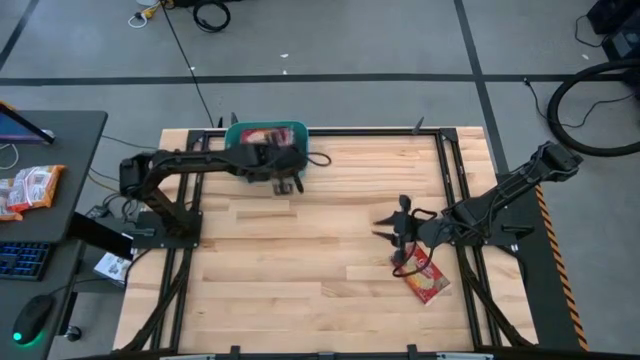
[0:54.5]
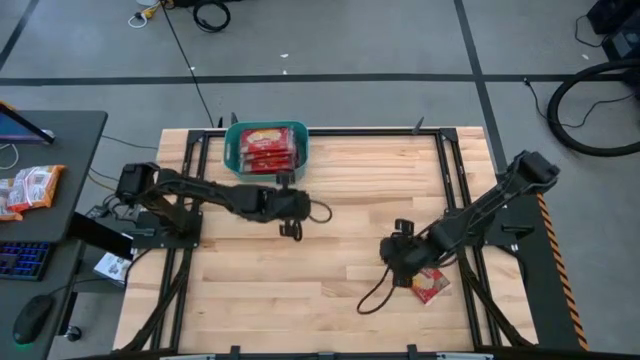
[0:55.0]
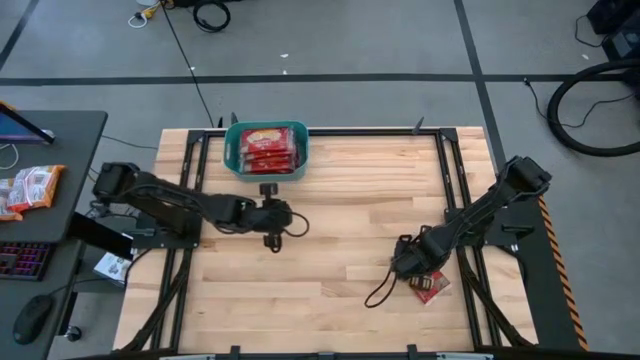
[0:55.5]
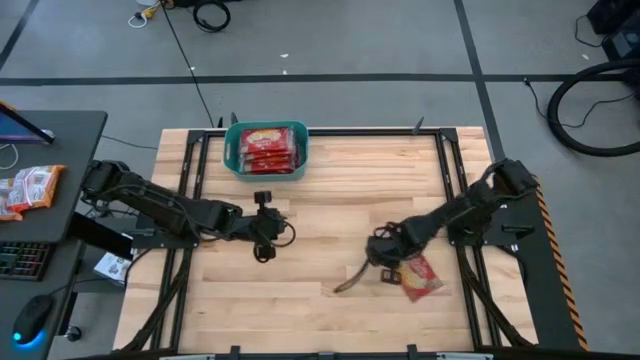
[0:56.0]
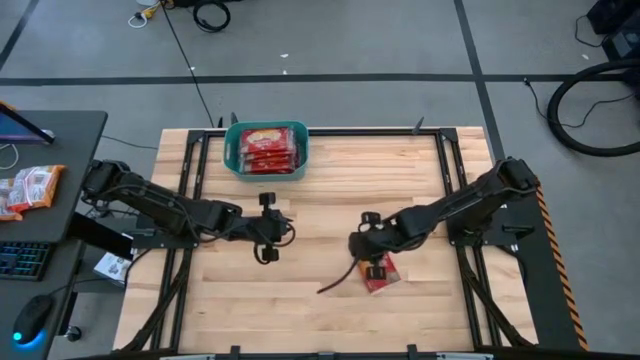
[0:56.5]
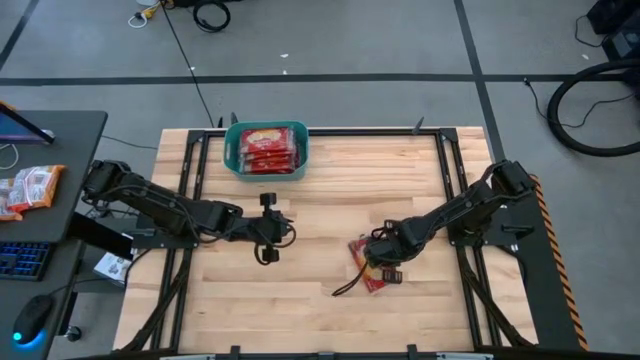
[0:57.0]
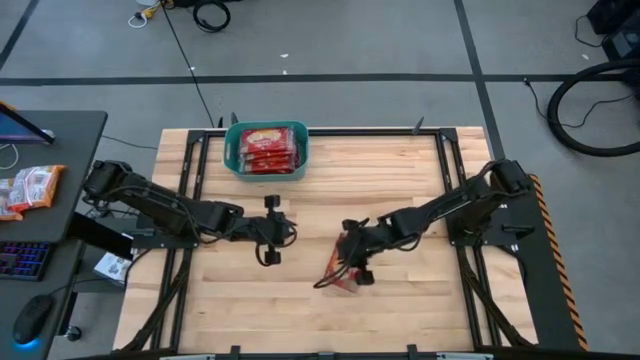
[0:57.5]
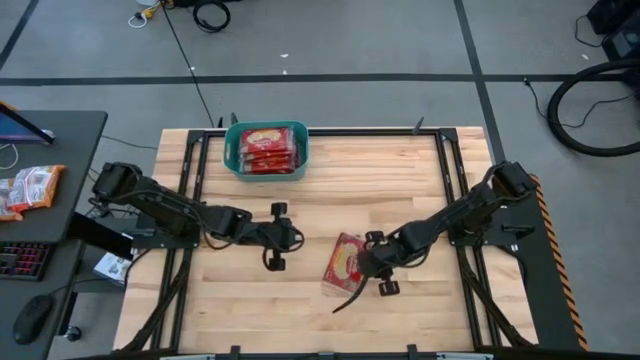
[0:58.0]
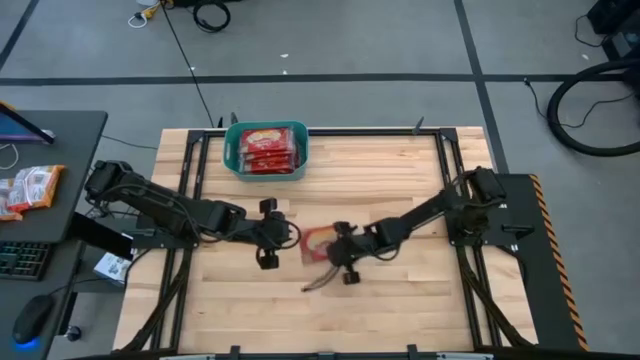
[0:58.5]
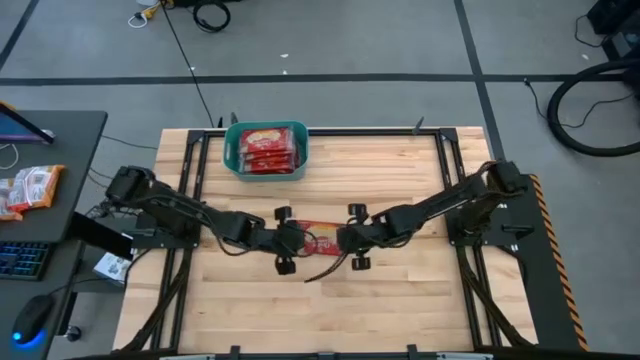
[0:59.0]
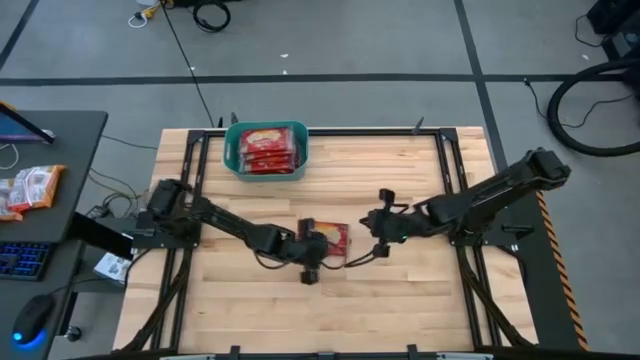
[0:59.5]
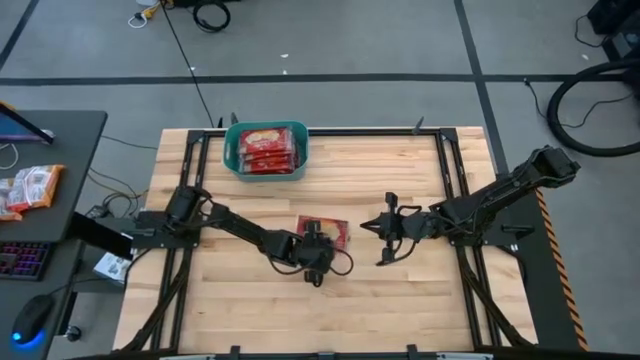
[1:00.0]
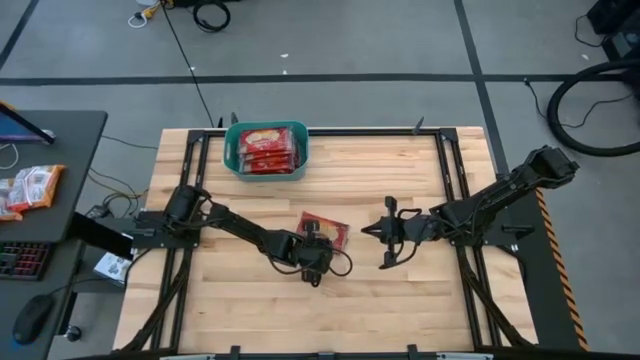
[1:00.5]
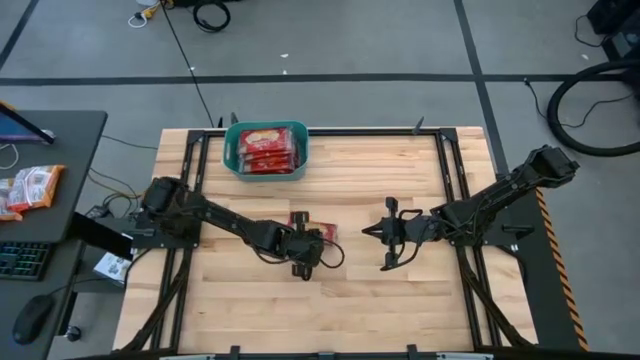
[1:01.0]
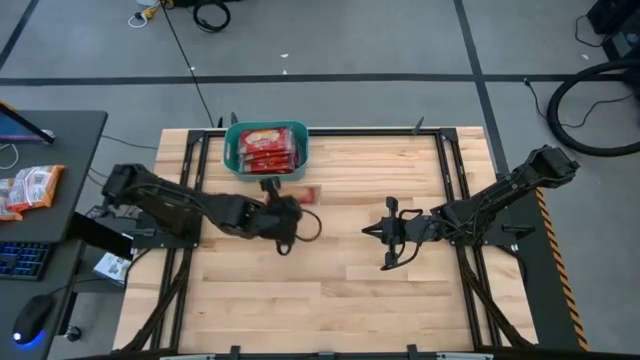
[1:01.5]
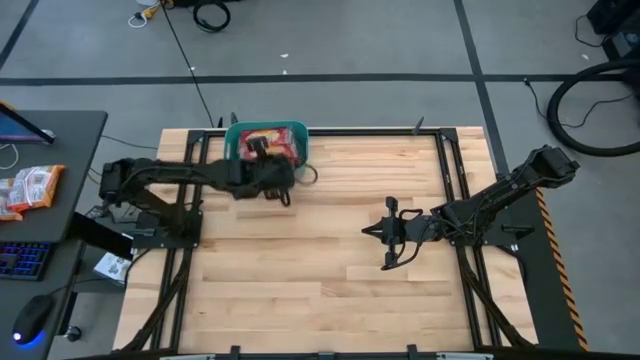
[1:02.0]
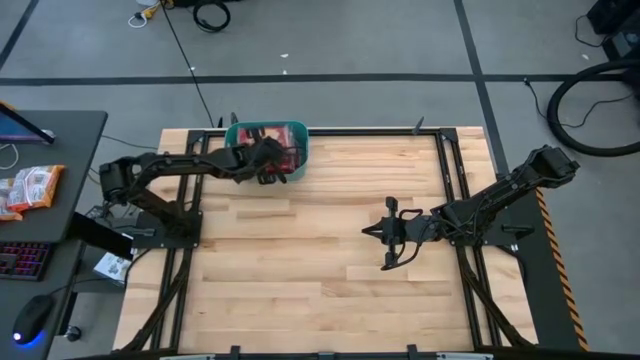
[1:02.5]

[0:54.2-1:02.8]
Task: Sort popcorn bags into baskets
Put the red popcorn bag into the green bin

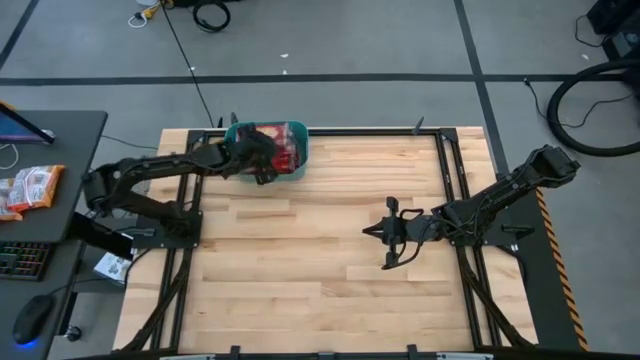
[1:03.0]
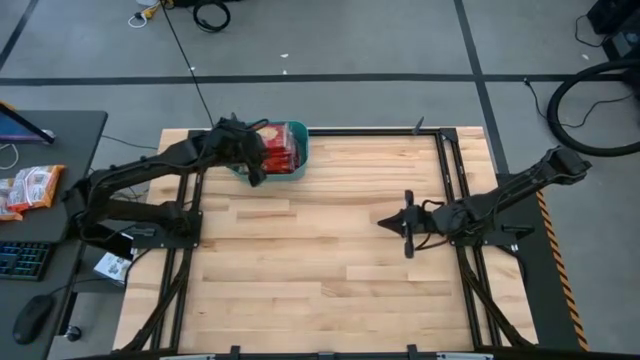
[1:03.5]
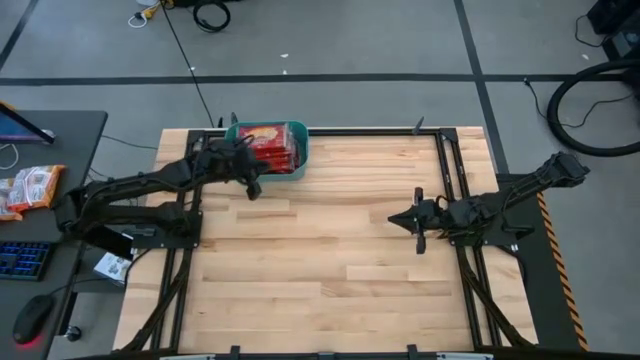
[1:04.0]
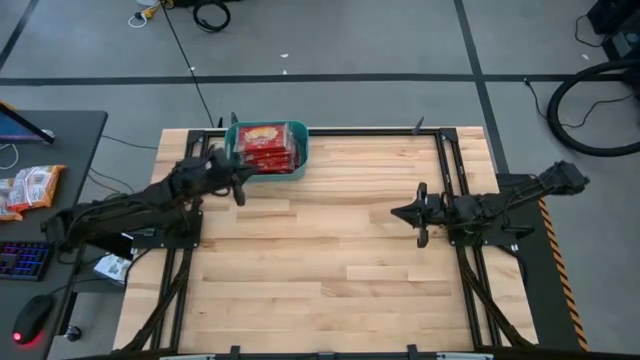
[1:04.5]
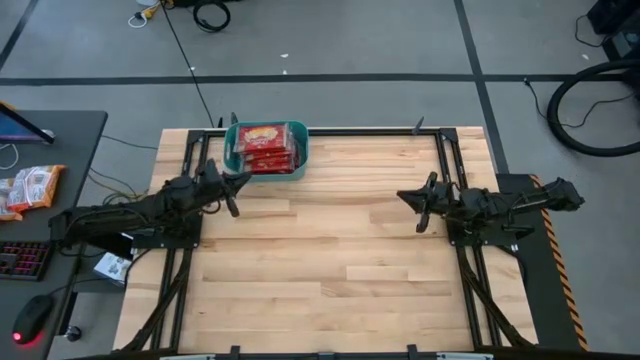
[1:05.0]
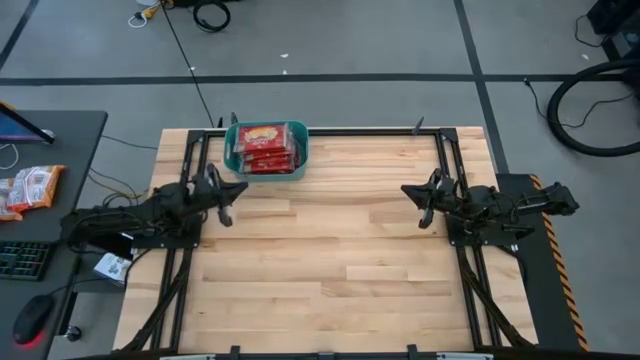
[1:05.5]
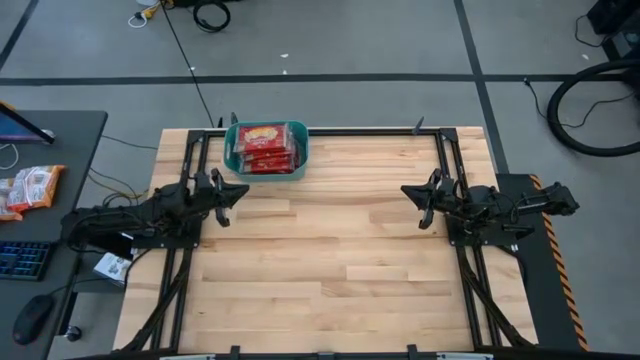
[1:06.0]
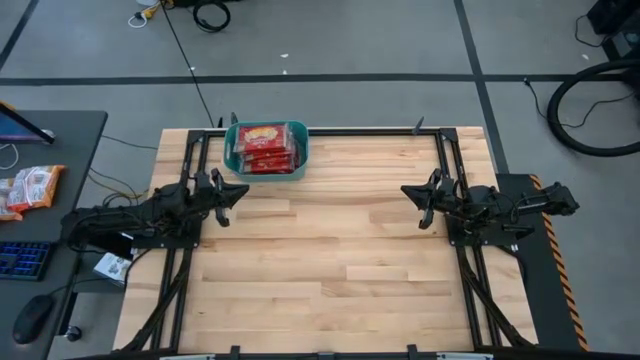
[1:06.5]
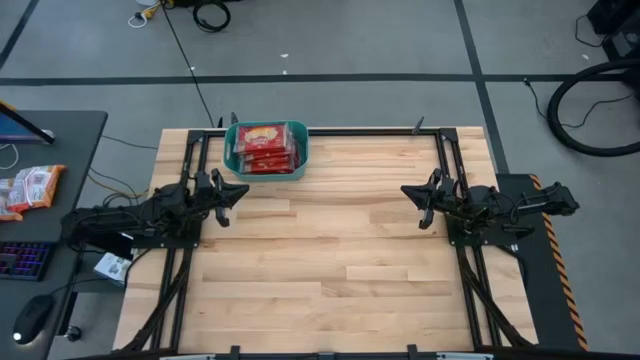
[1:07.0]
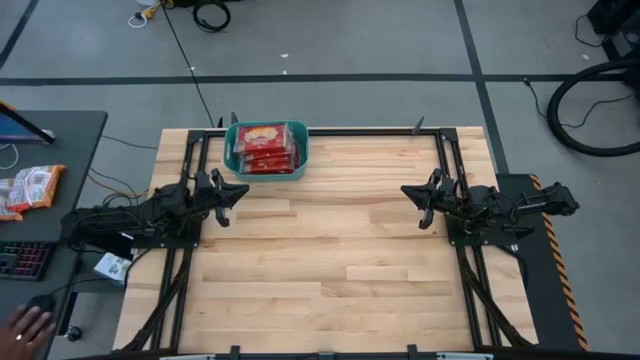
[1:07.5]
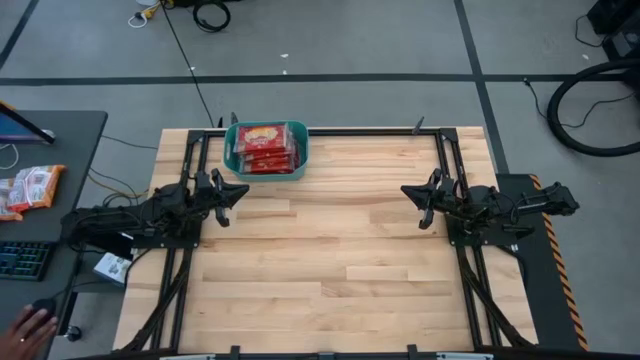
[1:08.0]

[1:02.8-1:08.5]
Return to Home Position

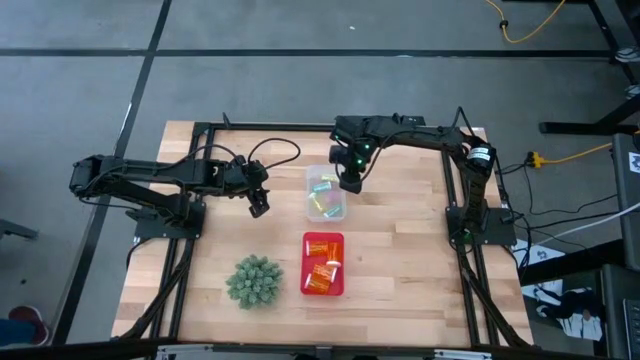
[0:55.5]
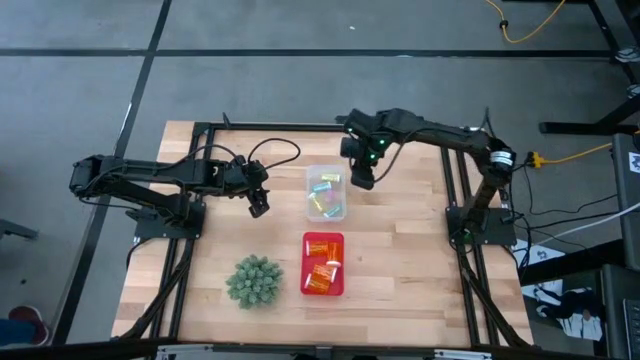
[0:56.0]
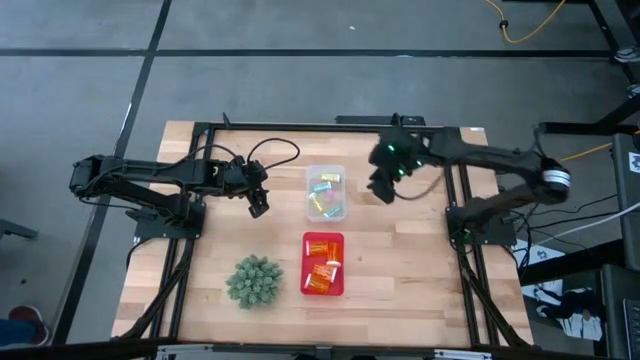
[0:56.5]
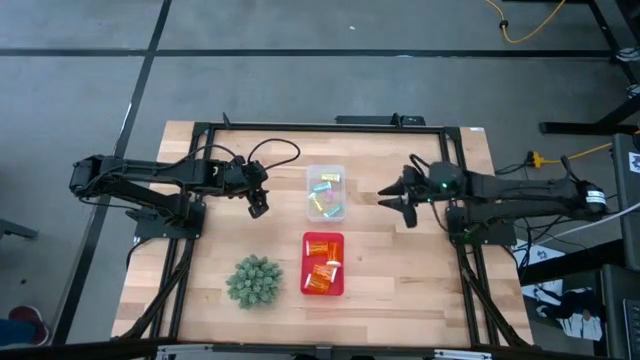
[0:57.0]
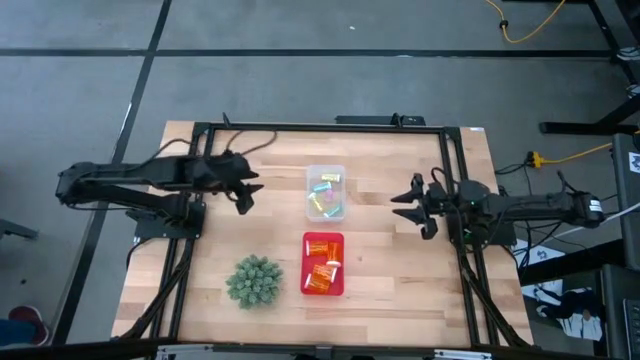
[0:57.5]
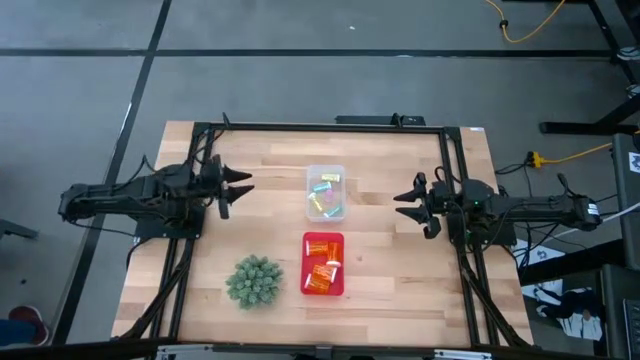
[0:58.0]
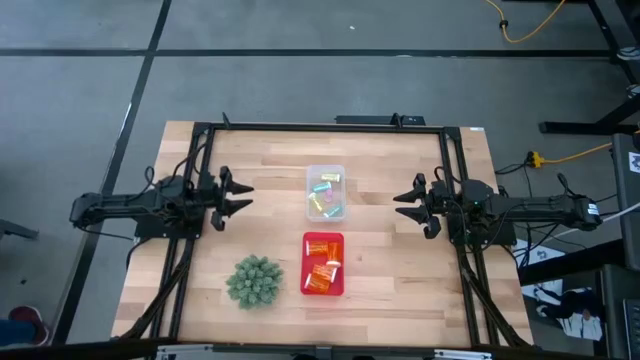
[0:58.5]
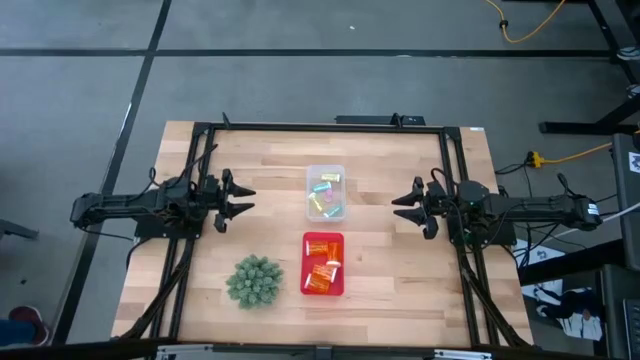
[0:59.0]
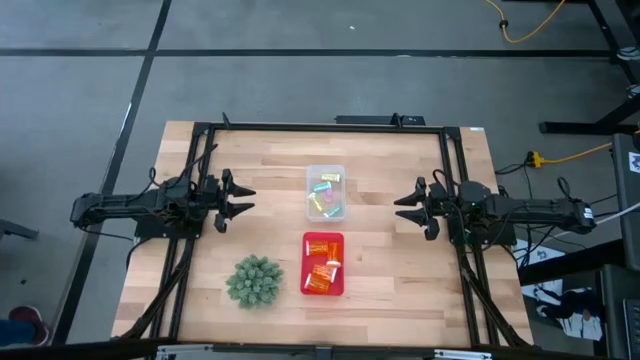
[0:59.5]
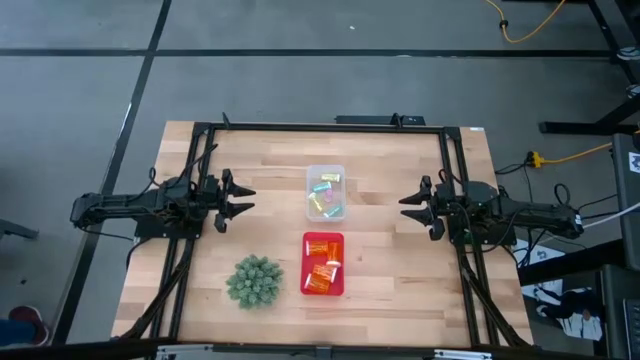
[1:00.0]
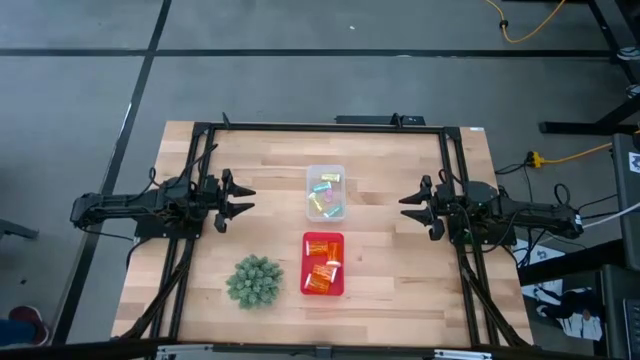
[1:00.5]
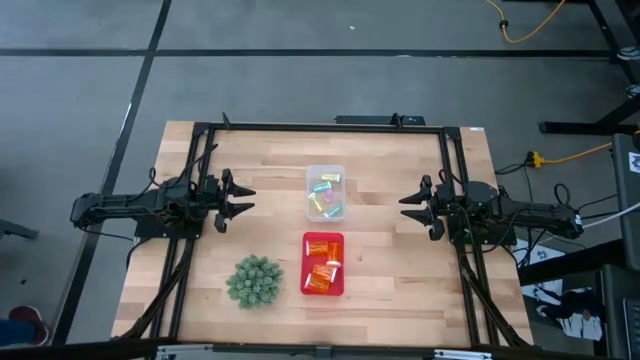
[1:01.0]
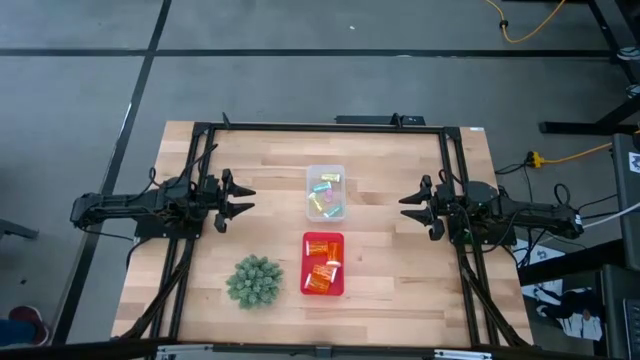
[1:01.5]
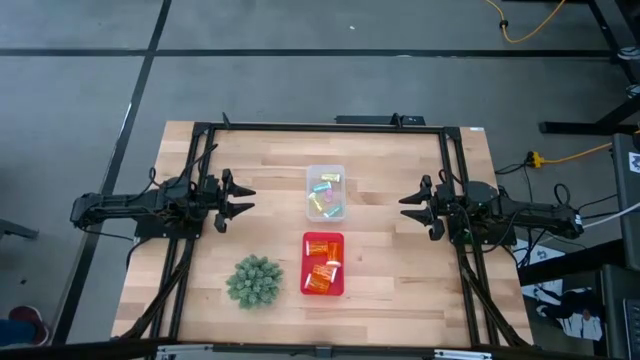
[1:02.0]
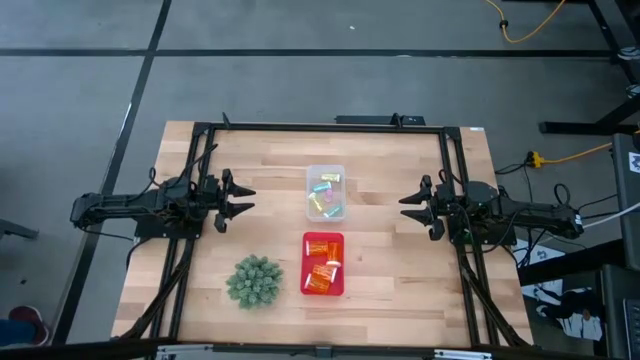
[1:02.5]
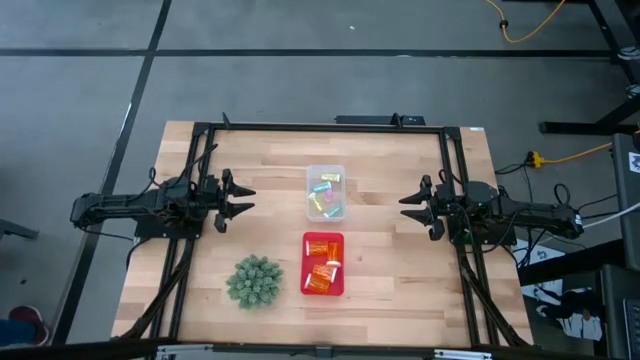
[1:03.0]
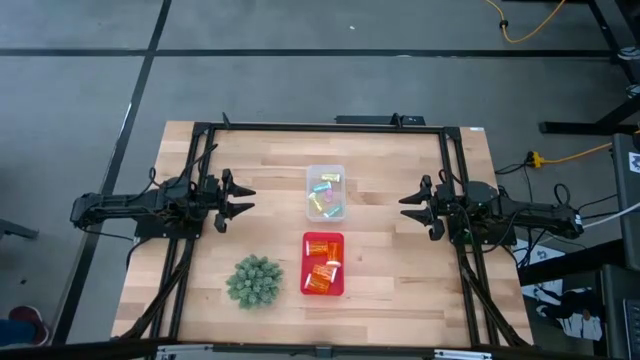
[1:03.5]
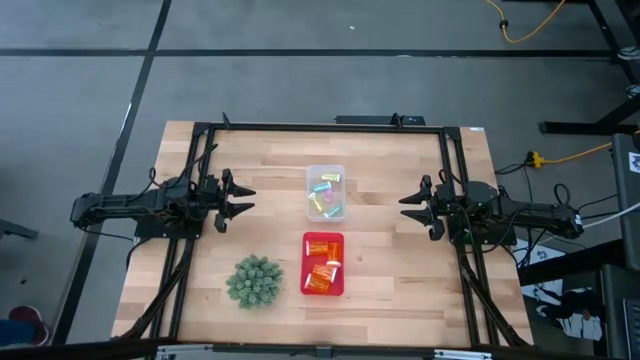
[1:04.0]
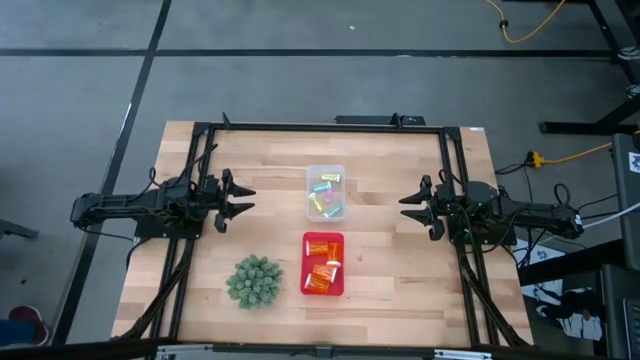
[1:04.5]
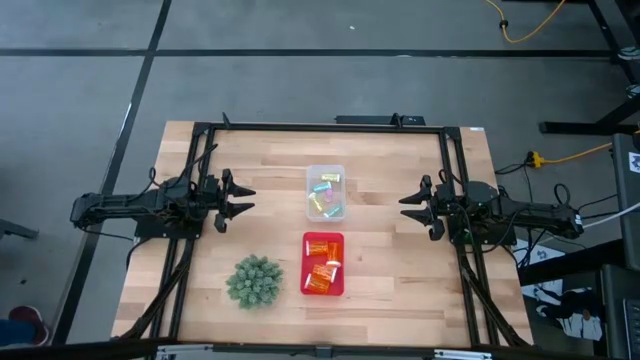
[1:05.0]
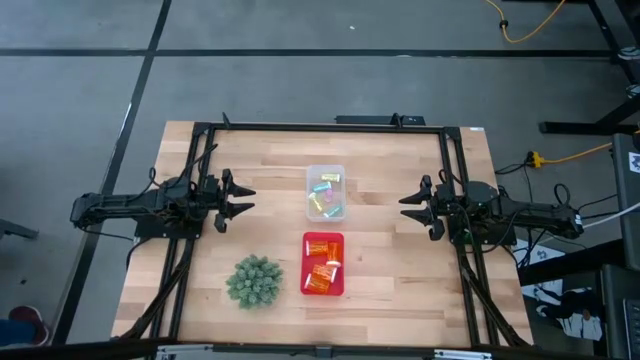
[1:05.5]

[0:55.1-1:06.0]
Task: Pick and place medicine bottles into bin by pill shape (circle, oval)
Return to Home Position
